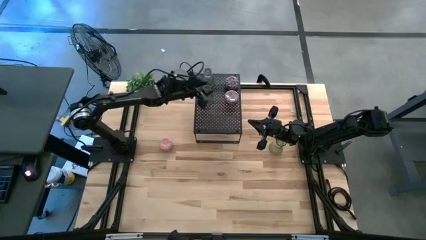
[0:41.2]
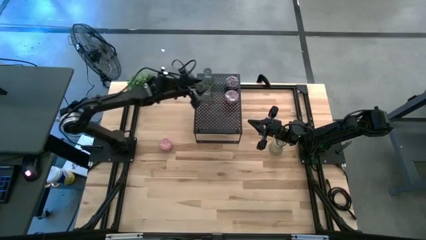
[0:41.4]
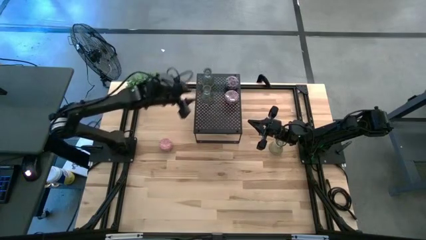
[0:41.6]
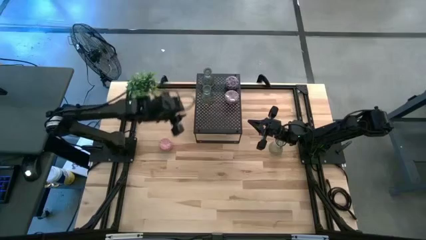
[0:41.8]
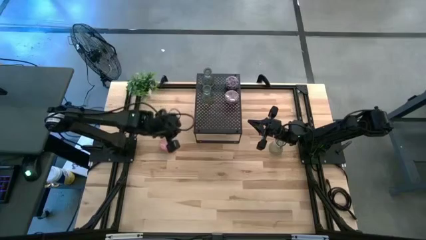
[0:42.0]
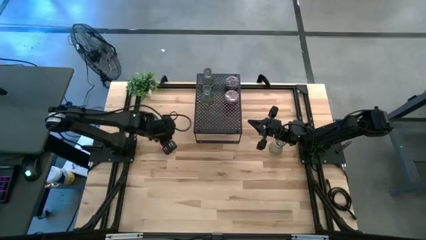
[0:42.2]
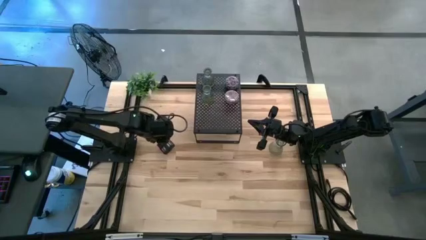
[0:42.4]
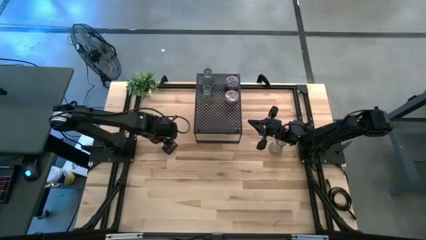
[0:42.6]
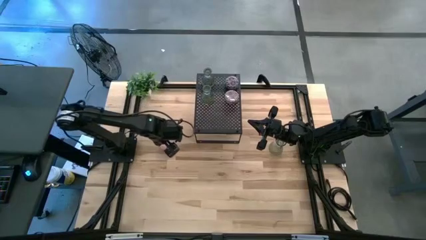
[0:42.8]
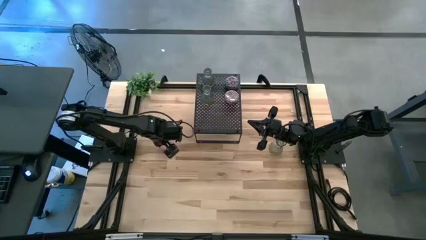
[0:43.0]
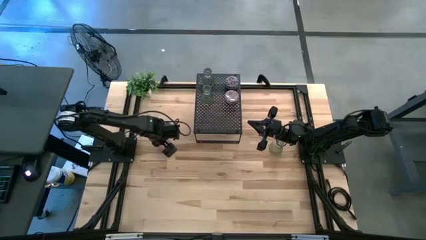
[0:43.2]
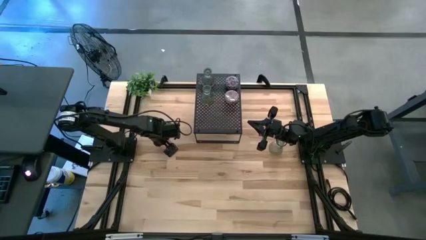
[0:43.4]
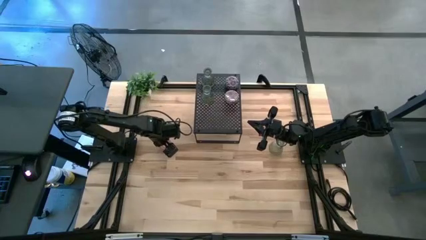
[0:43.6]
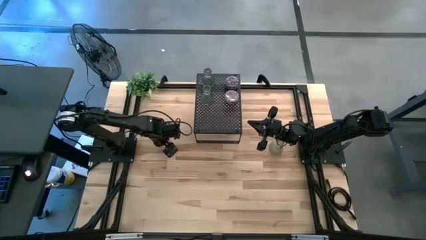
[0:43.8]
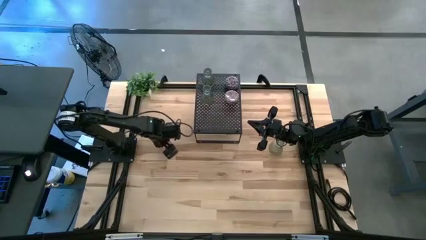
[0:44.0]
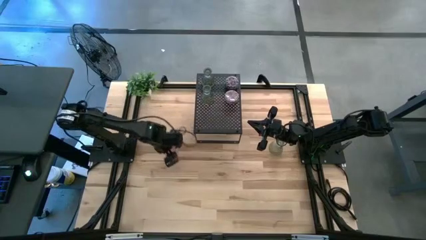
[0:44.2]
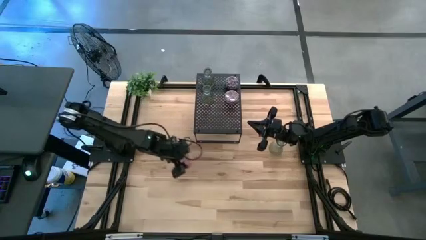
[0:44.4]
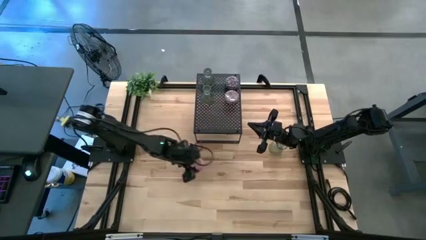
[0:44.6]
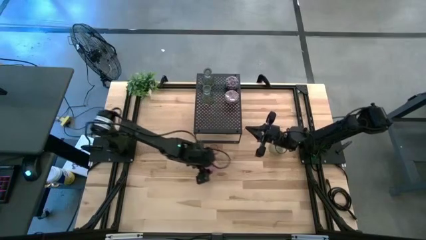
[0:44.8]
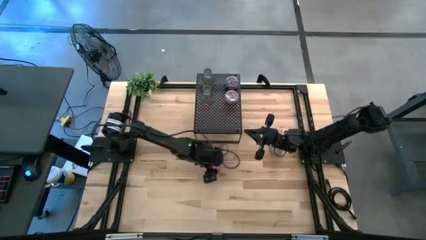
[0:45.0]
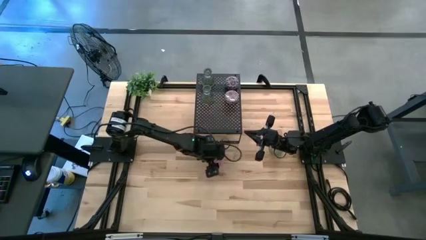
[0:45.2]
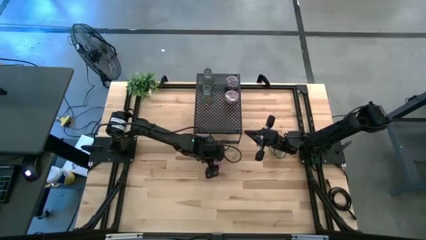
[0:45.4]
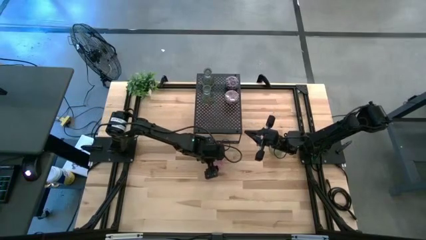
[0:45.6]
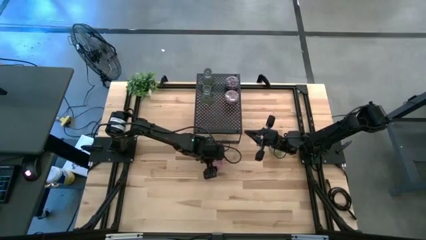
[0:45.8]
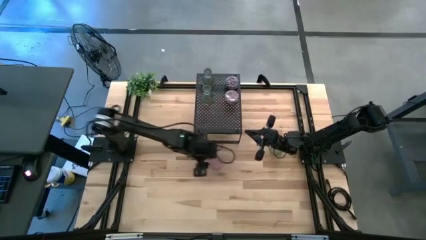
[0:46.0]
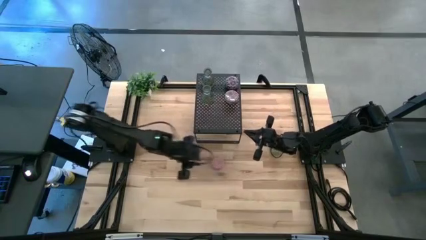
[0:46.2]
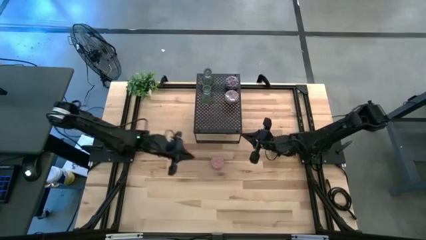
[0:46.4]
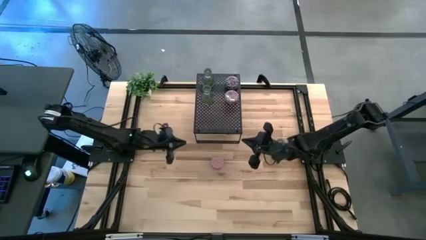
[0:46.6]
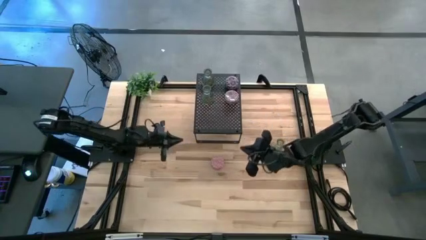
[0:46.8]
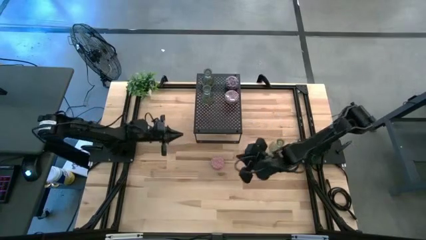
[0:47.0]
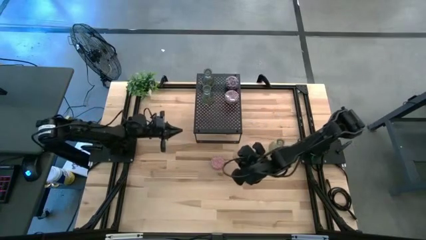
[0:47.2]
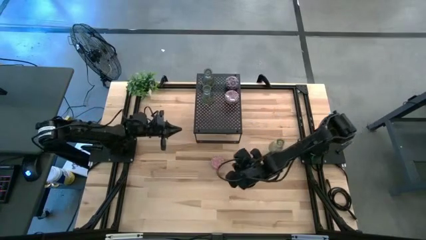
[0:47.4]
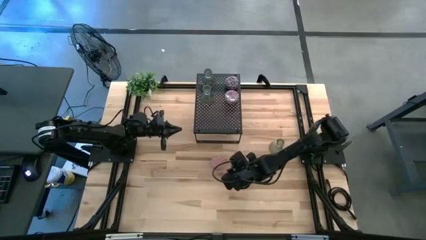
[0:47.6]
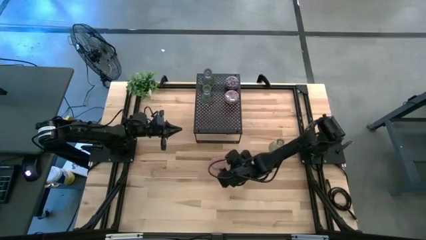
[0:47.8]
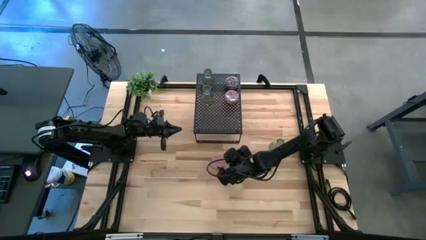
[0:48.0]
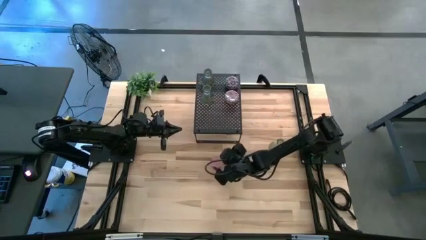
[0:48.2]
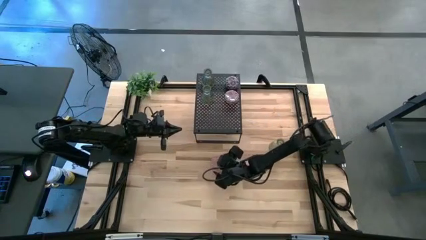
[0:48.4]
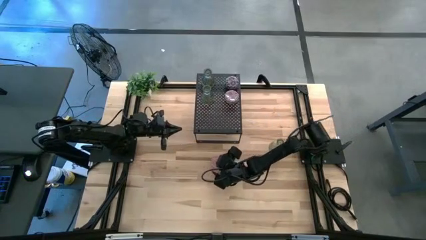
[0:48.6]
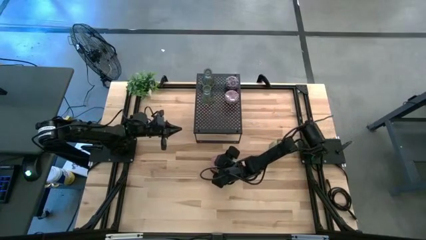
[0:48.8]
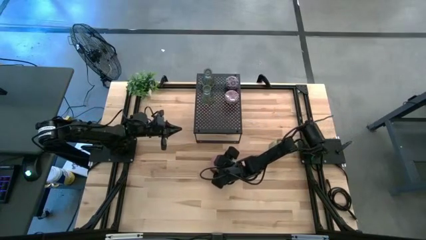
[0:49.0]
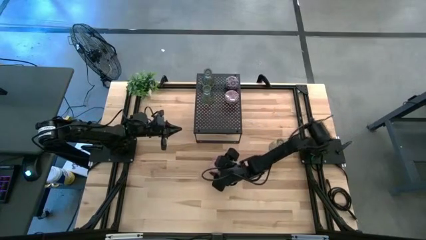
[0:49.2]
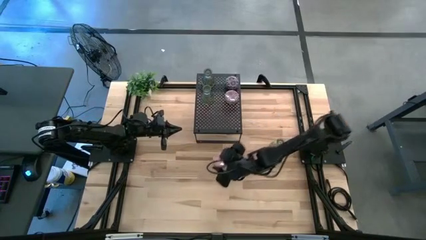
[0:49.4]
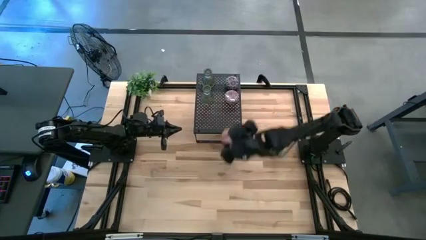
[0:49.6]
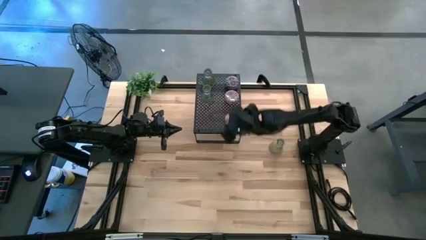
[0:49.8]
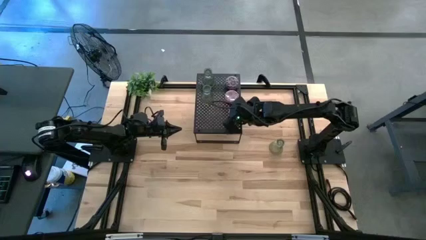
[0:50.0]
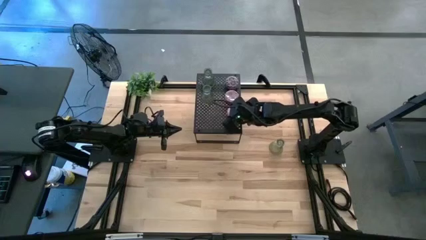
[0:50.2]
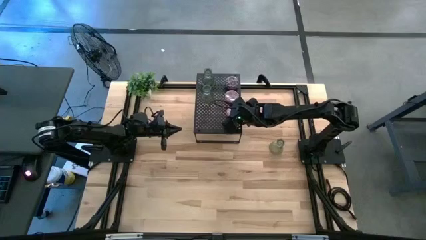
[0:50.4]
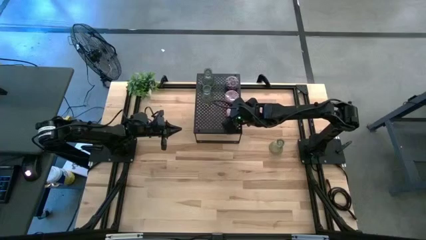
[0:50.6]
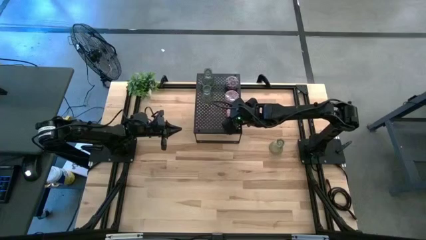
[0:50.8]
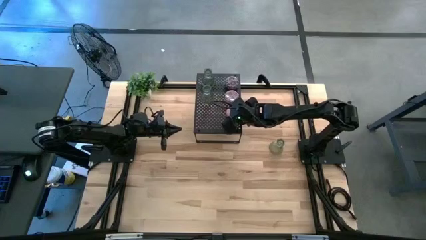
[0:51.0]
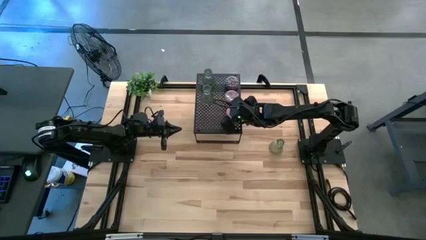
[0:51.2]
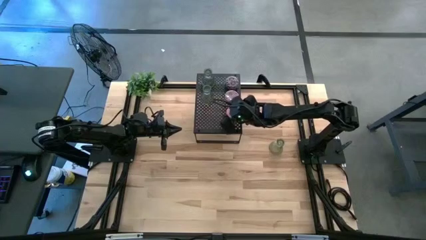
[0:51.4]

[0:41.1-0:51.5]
Task: Stock candles and vases on shelf
Put the pink scented candle on the shelf
